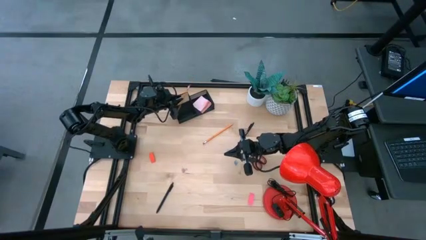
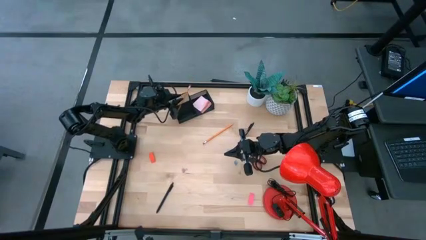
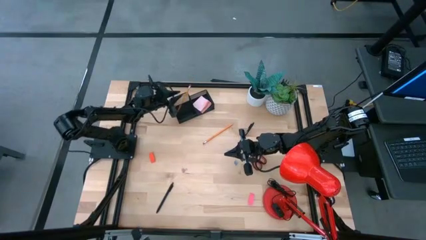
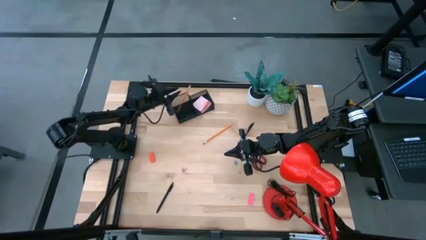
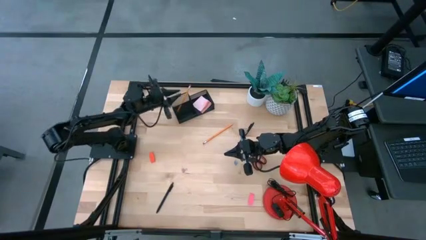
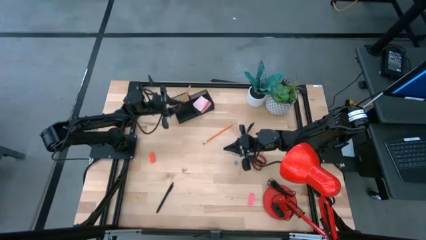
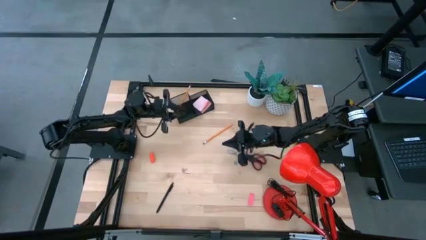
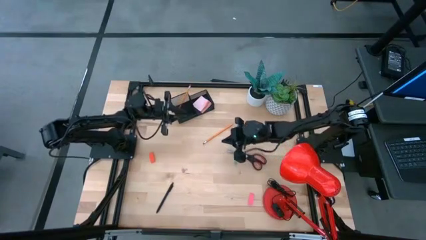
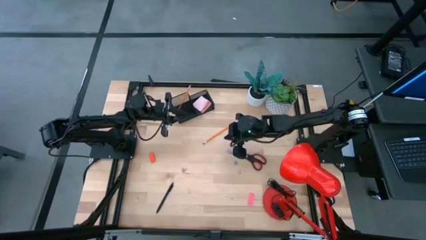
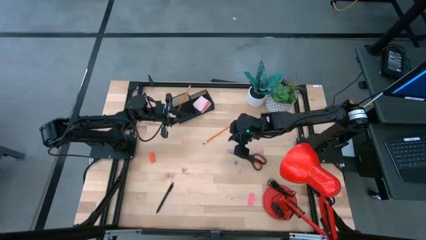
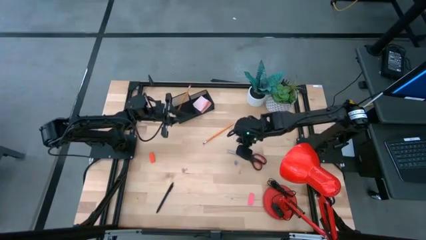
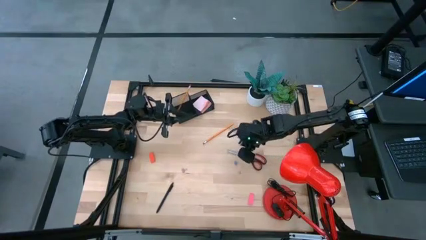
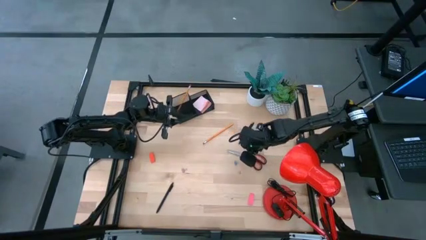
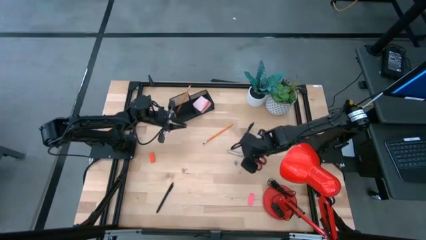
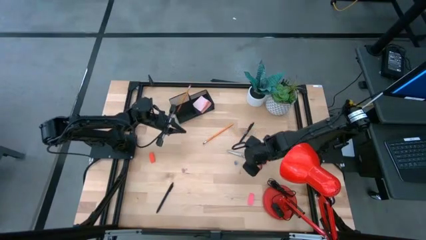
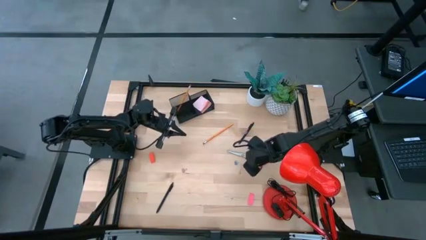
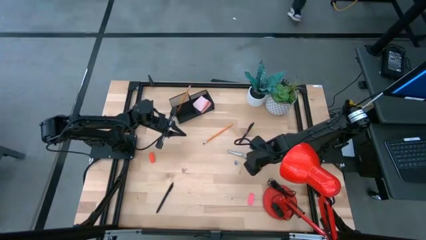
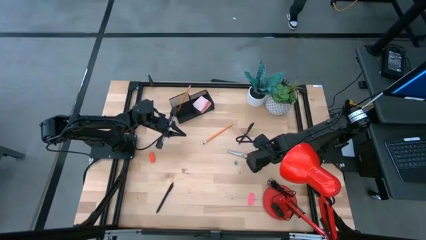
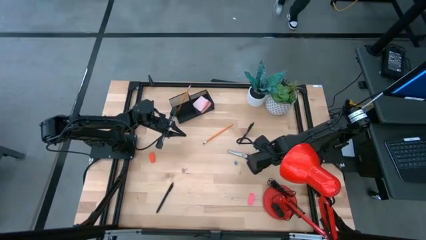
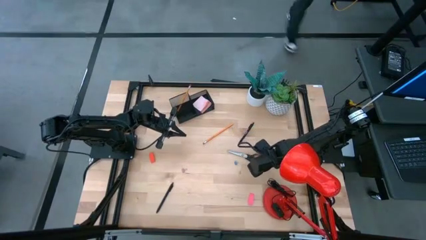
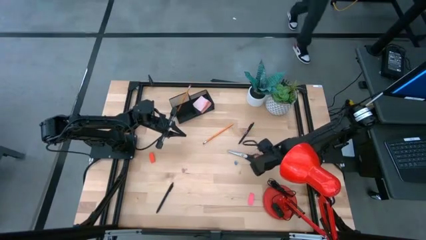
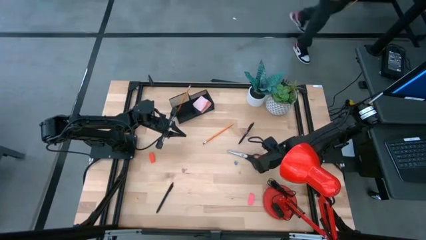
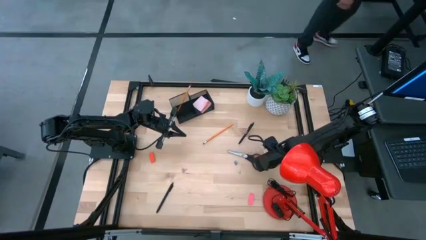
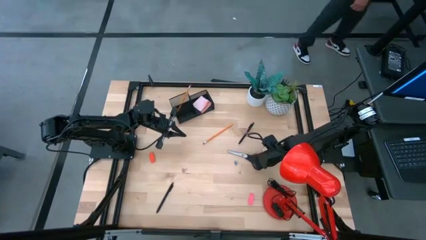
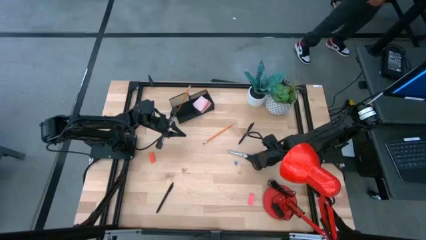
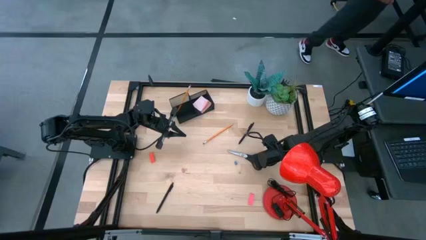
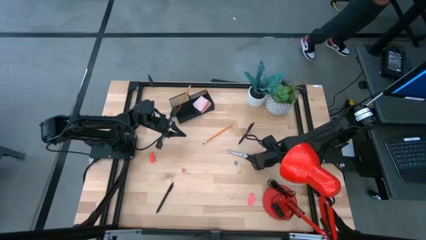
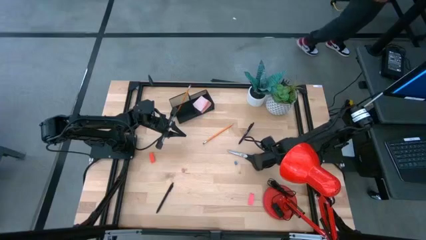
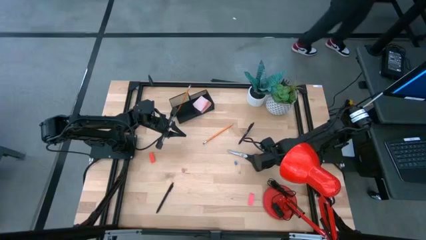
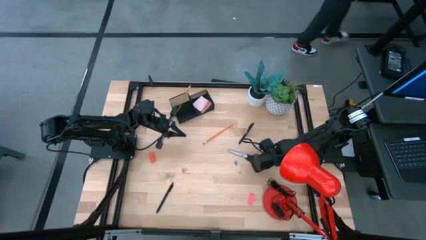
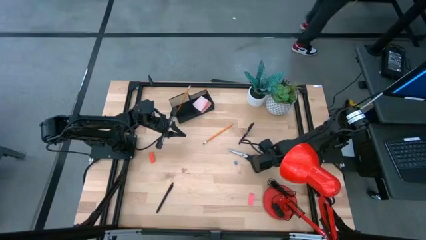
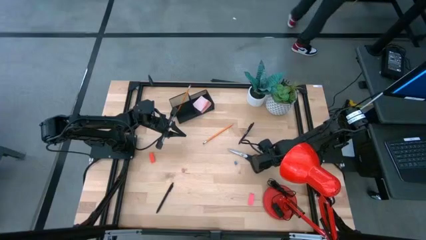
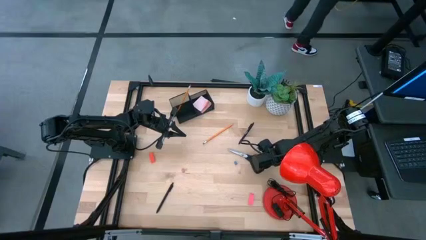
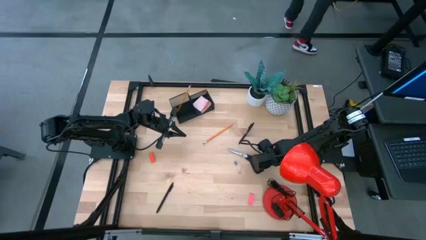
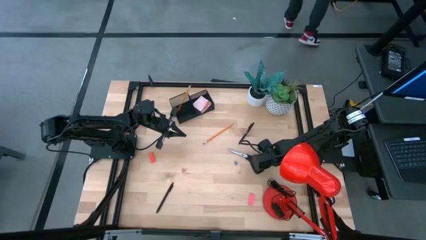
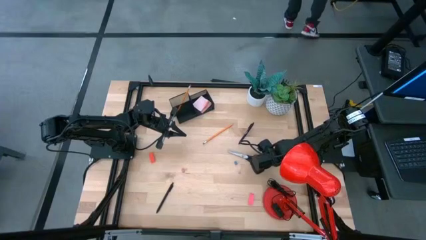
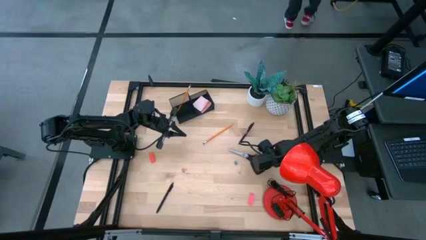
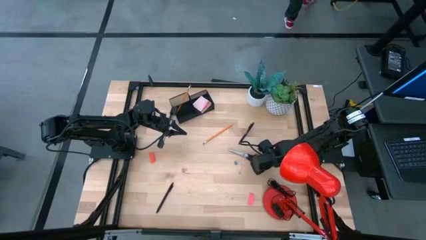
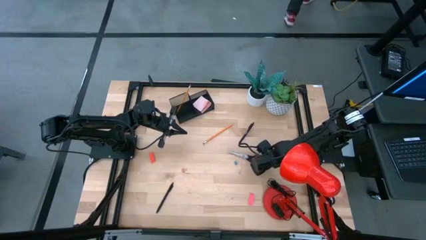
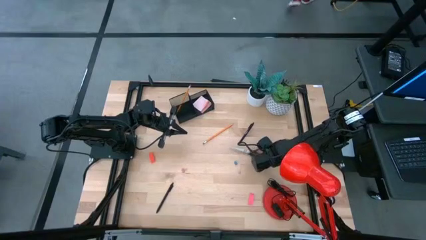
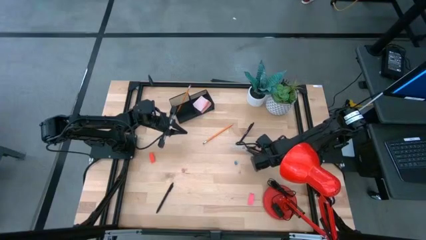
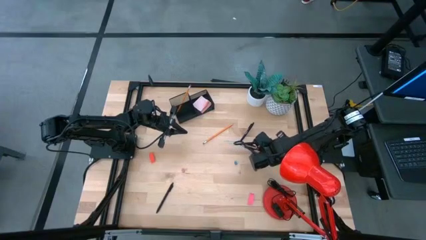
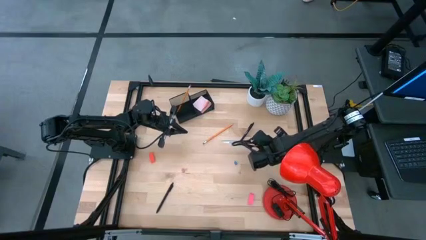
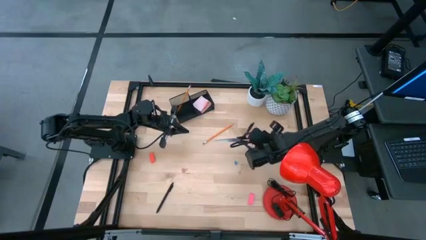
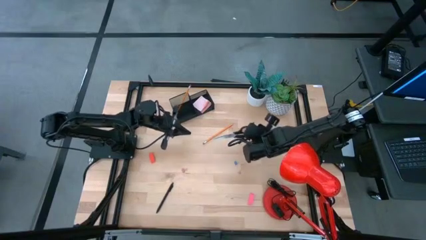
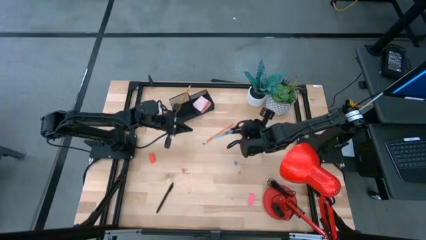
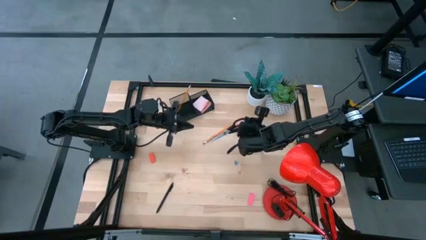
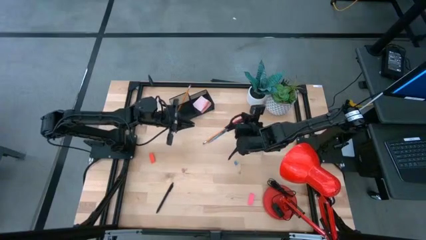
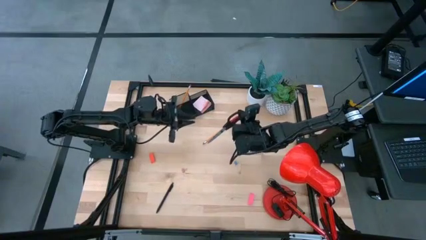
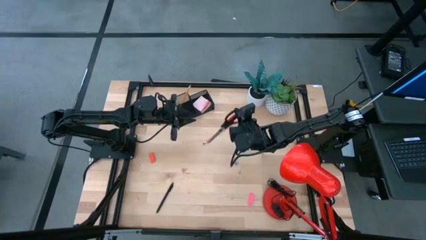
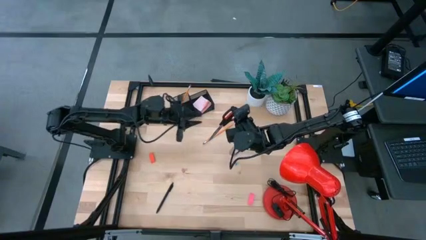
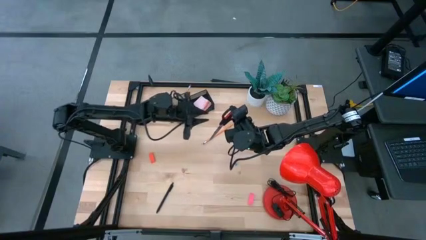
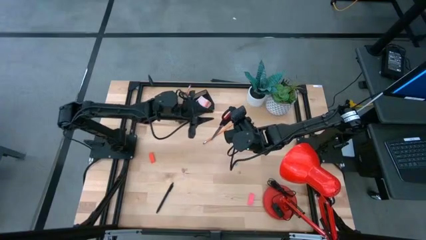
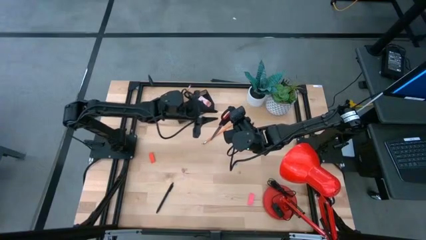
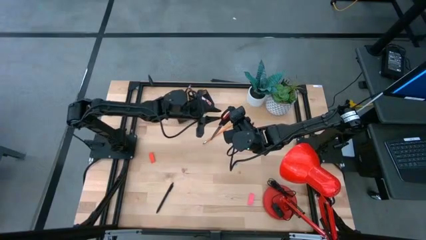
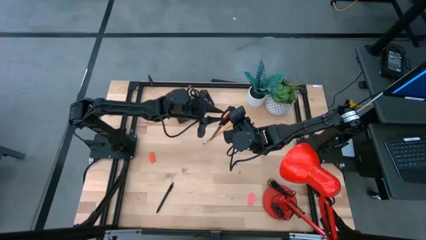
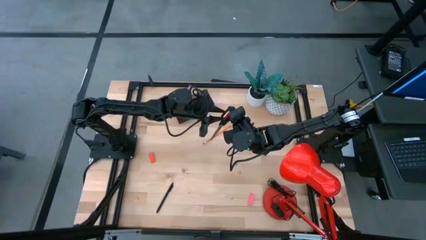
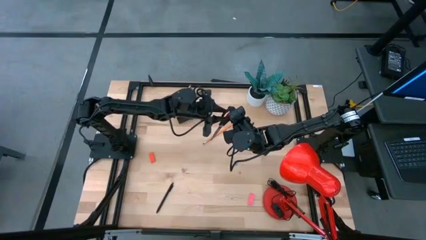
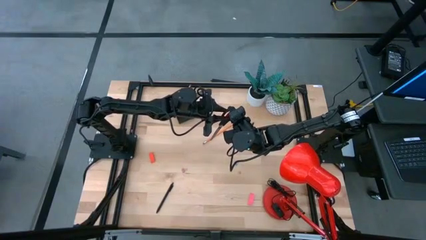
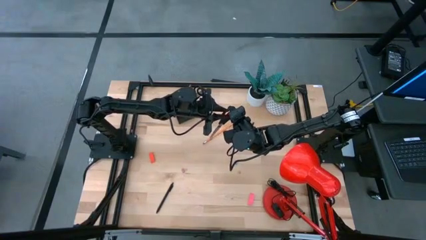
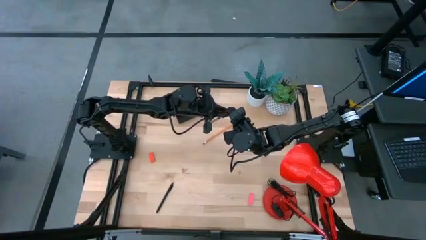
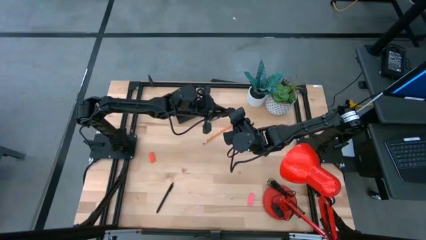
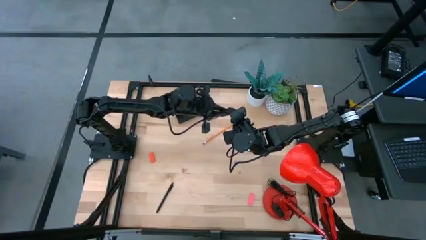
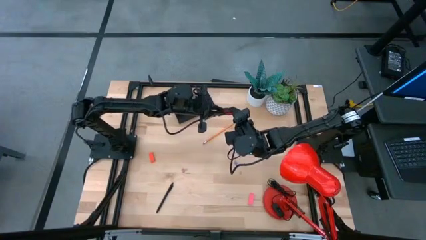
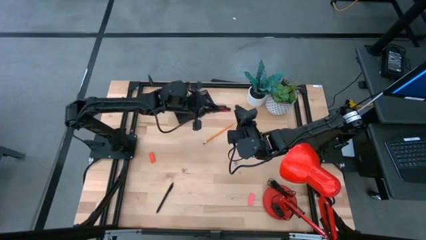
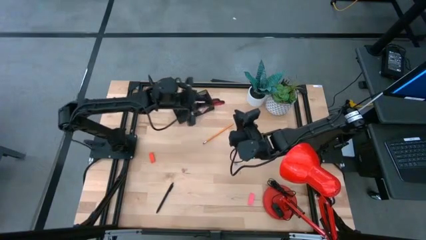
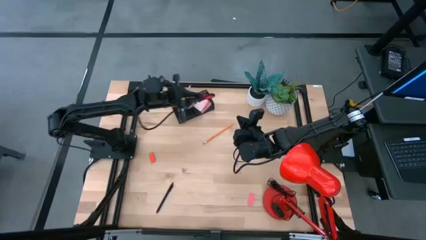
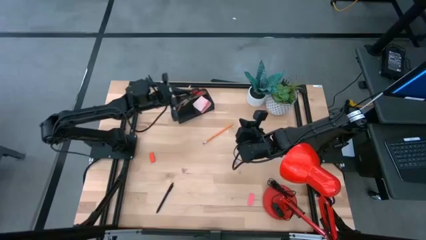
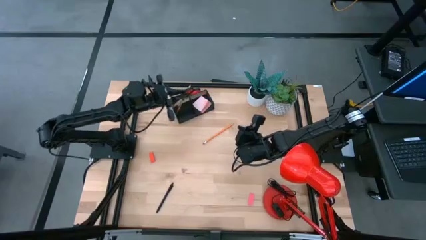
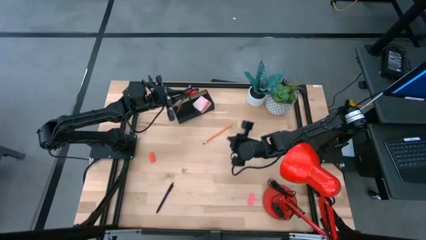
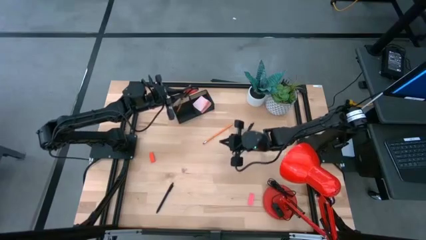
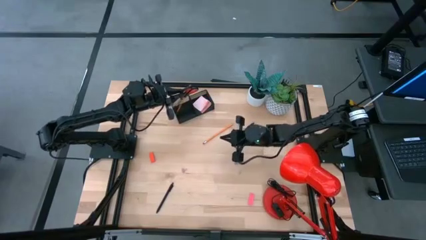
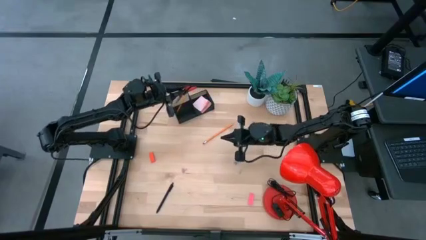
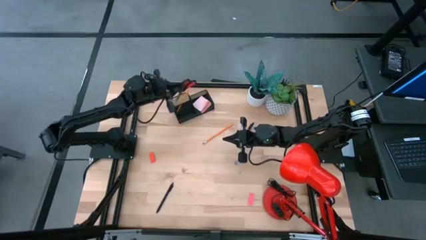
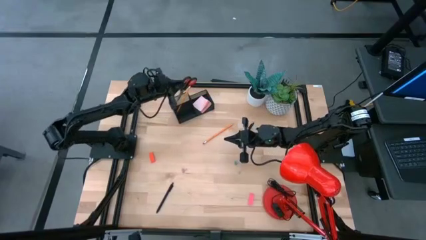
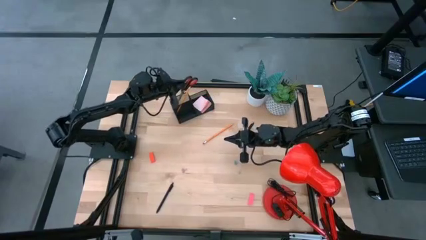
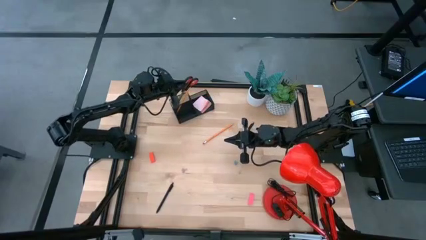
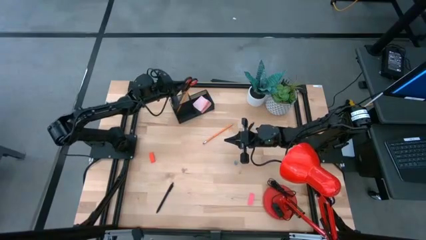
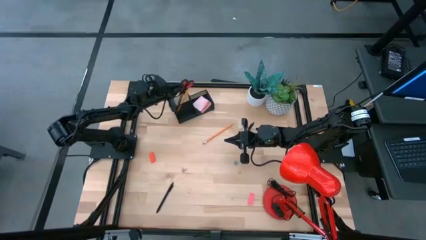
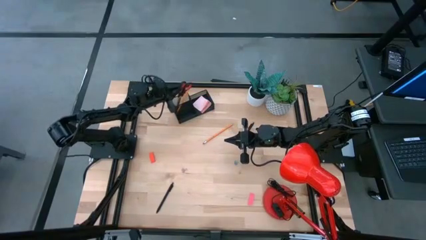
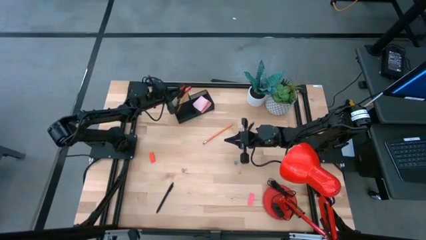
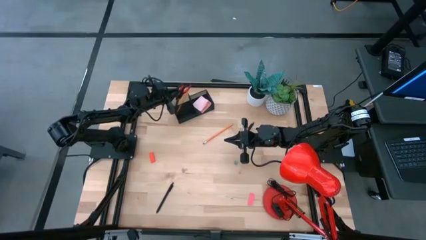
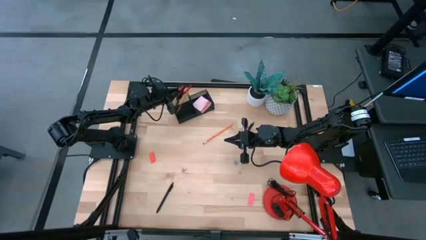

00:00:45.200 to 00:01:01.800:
Task: Pick and place office supplies into organizer
Put the scissors into the desk organizer
